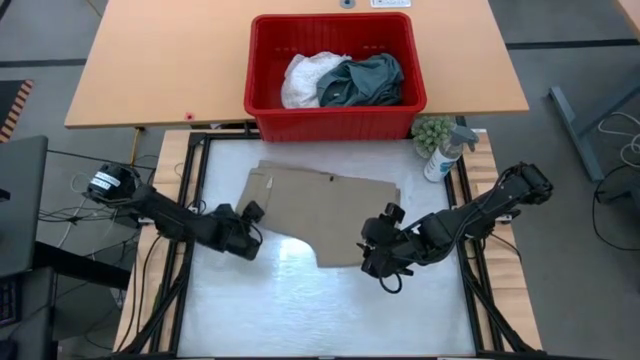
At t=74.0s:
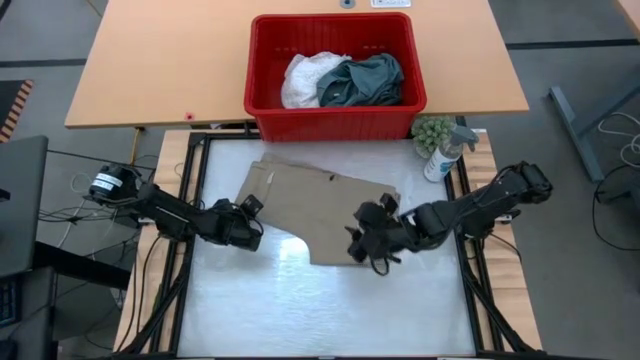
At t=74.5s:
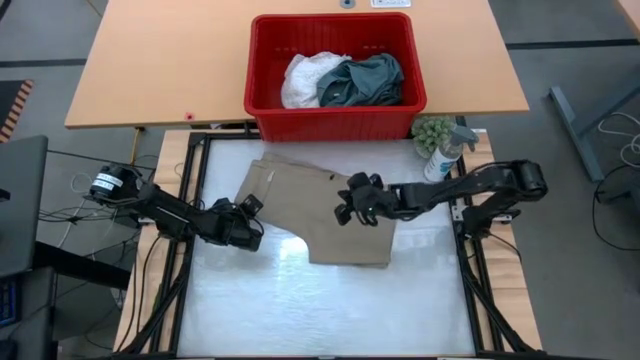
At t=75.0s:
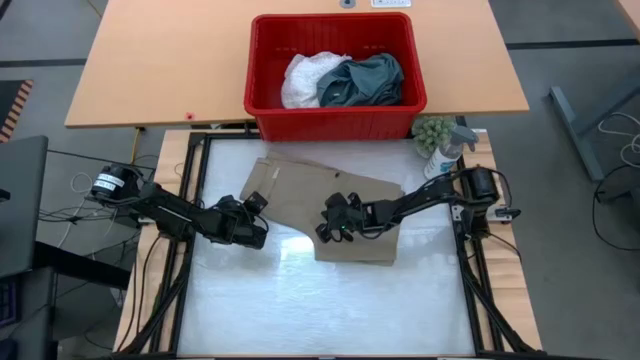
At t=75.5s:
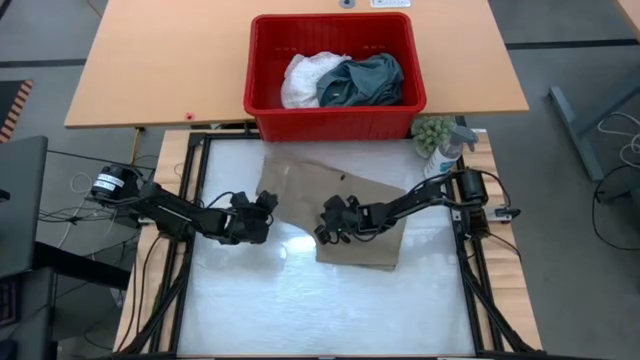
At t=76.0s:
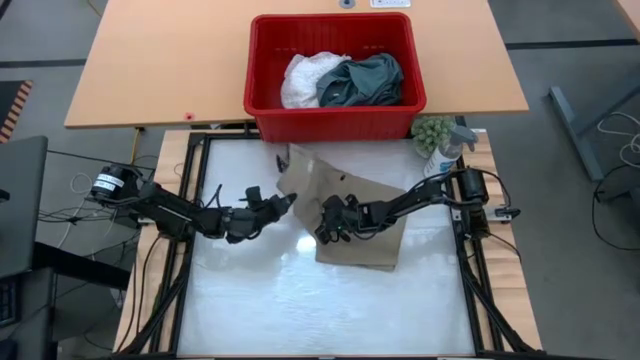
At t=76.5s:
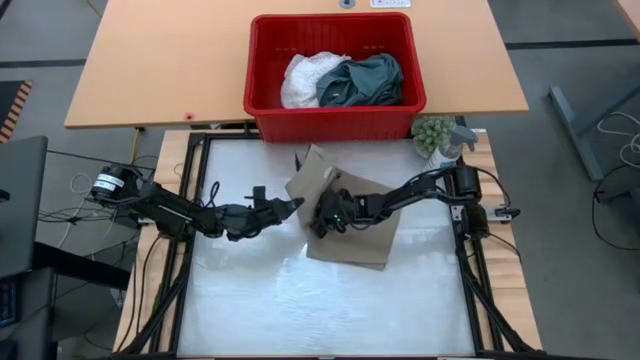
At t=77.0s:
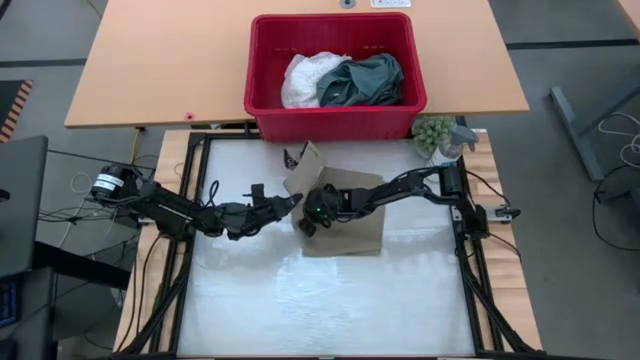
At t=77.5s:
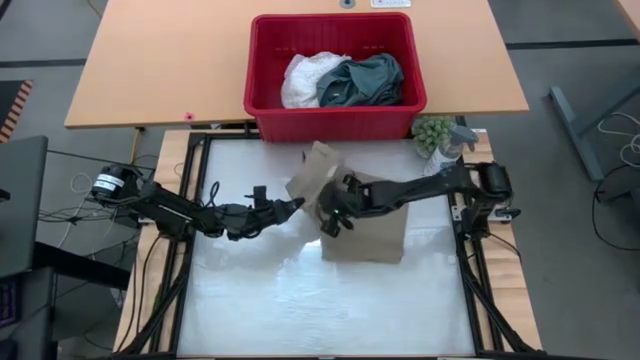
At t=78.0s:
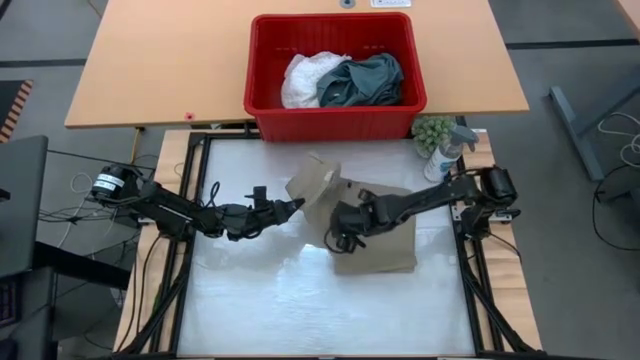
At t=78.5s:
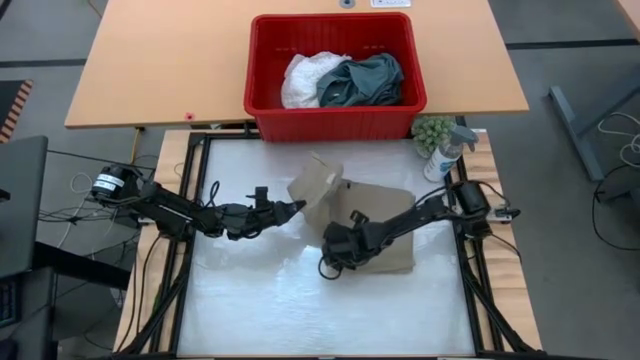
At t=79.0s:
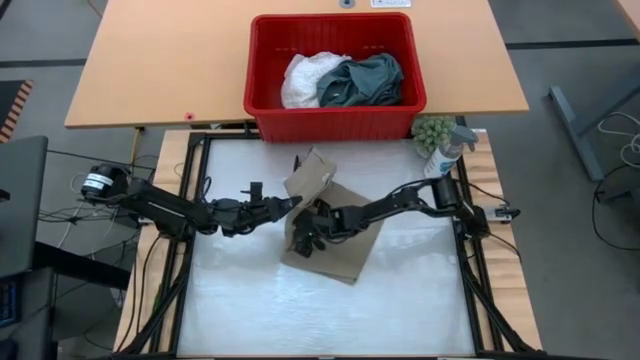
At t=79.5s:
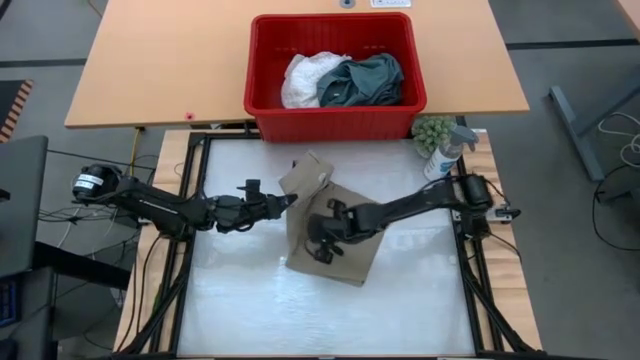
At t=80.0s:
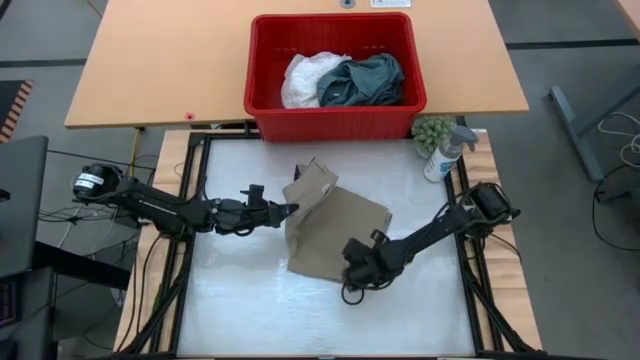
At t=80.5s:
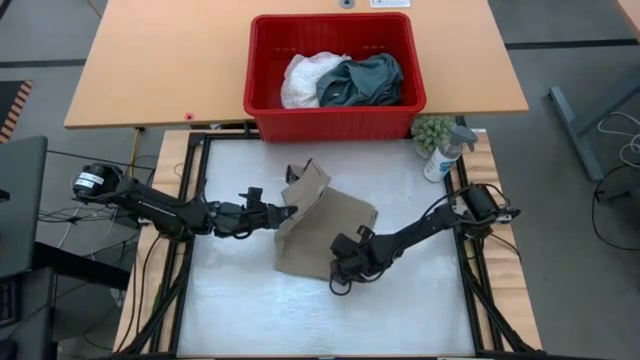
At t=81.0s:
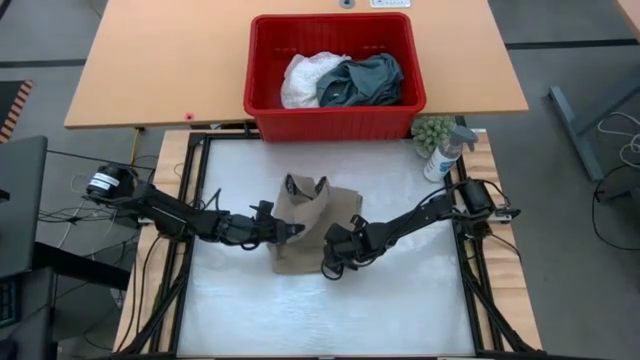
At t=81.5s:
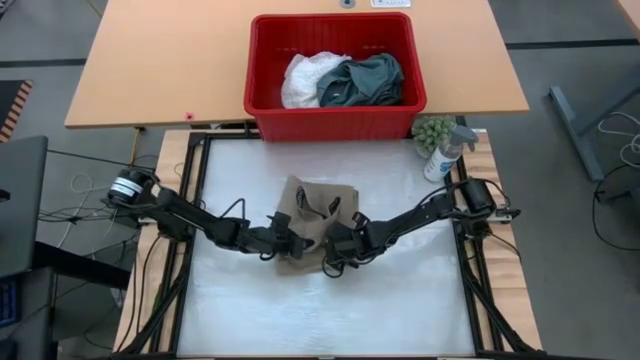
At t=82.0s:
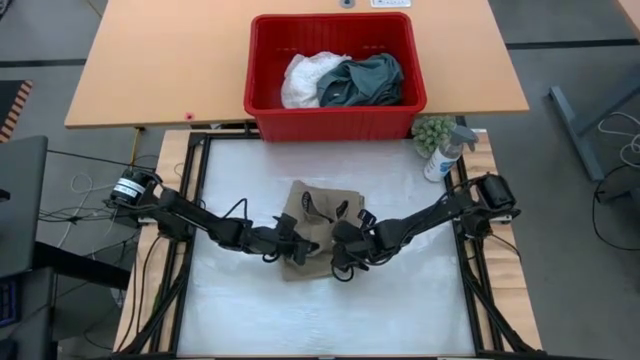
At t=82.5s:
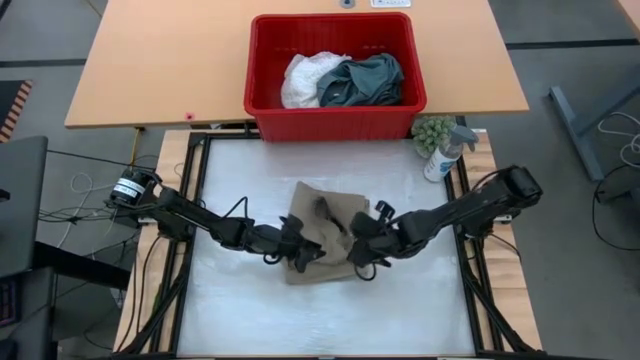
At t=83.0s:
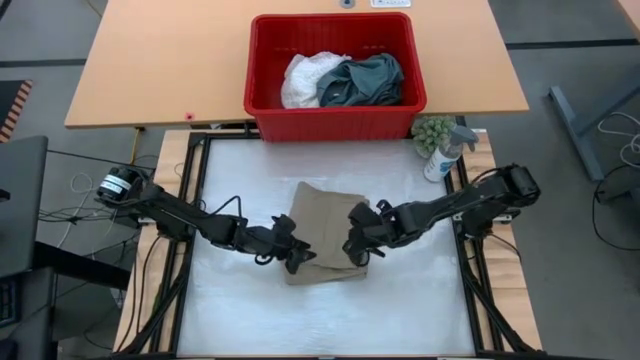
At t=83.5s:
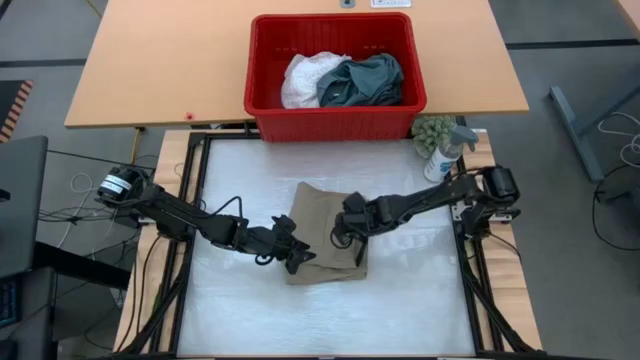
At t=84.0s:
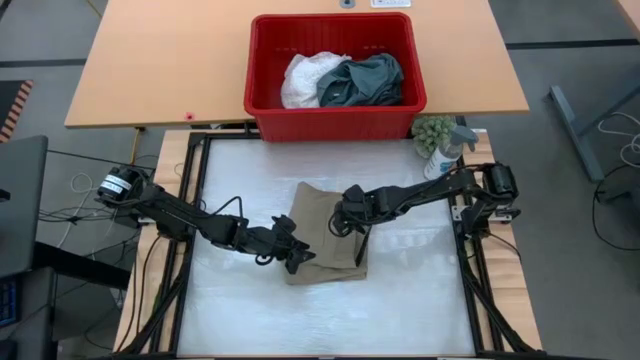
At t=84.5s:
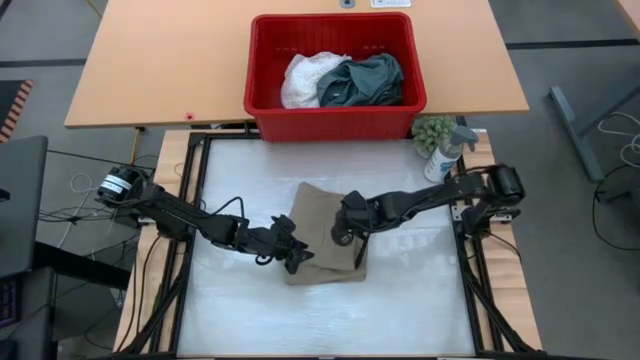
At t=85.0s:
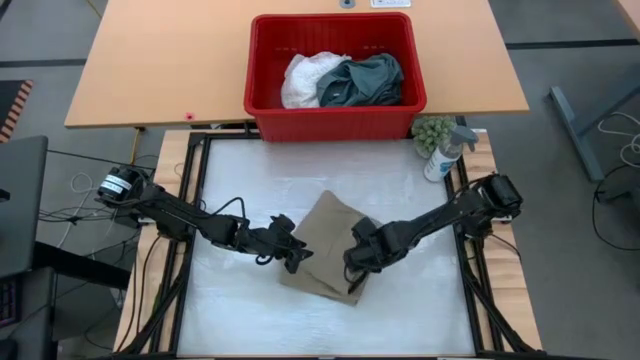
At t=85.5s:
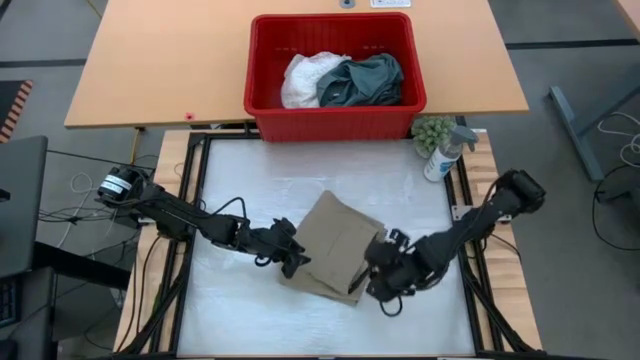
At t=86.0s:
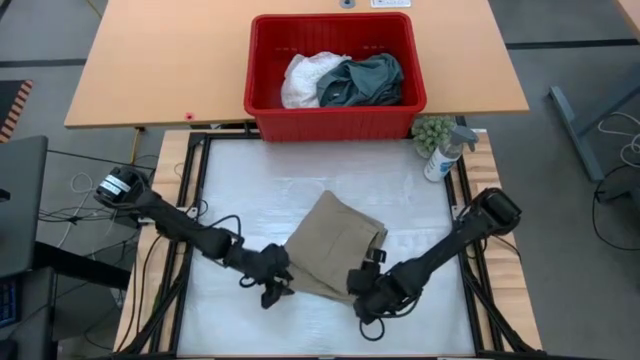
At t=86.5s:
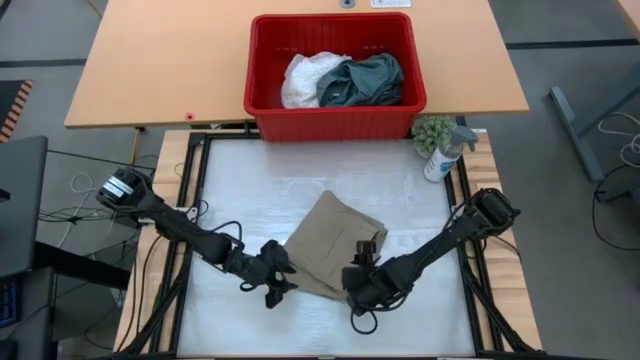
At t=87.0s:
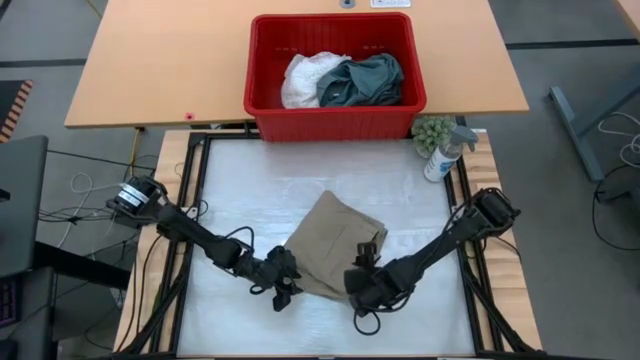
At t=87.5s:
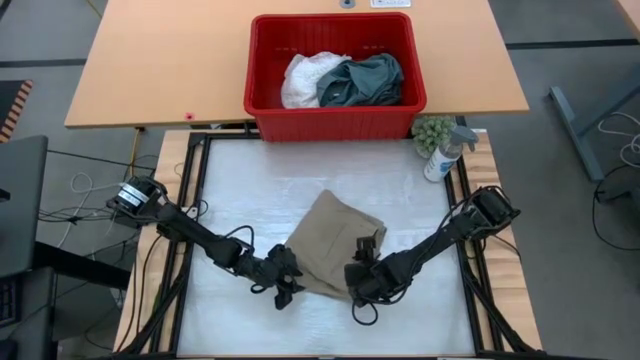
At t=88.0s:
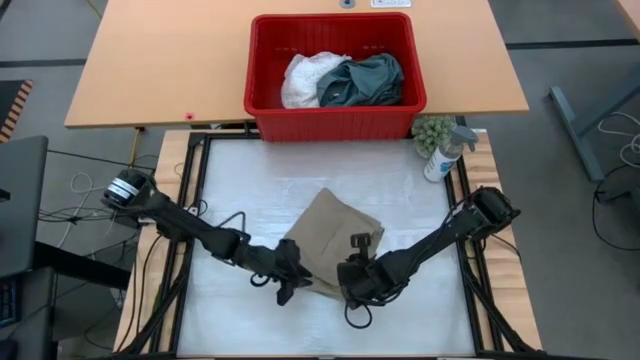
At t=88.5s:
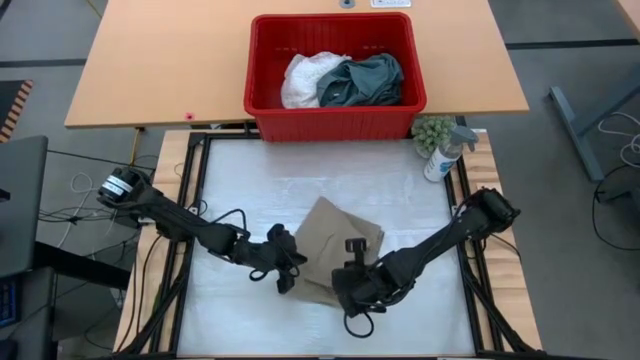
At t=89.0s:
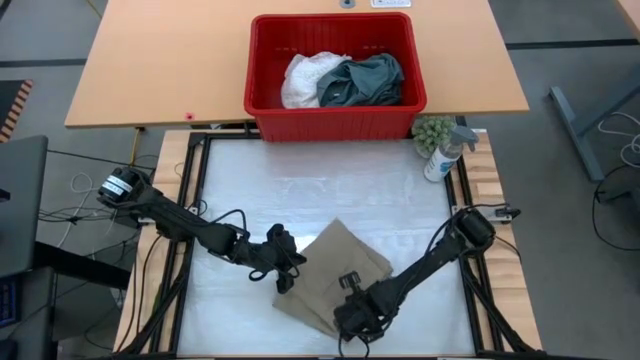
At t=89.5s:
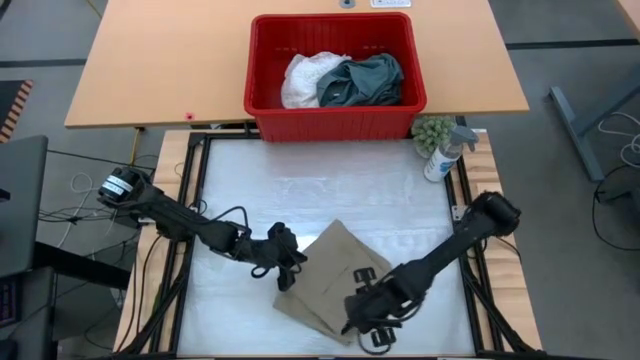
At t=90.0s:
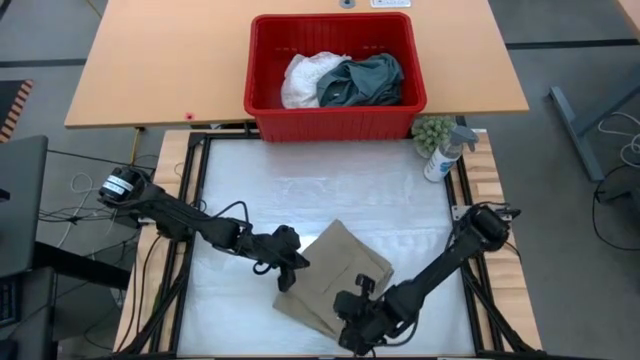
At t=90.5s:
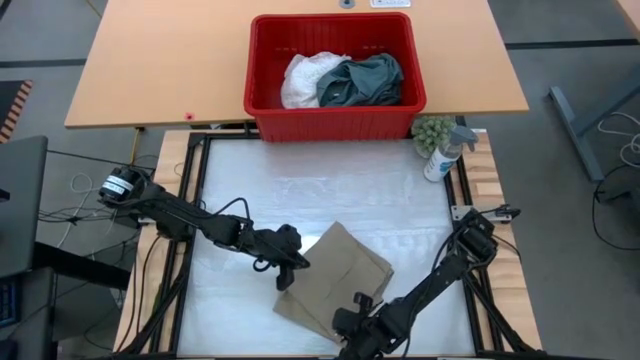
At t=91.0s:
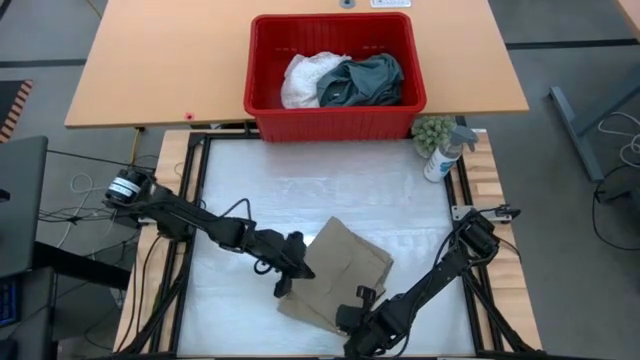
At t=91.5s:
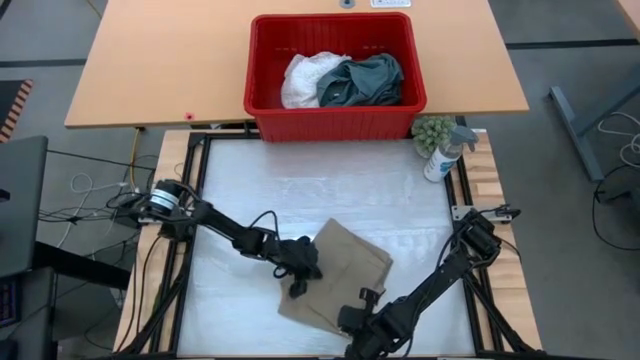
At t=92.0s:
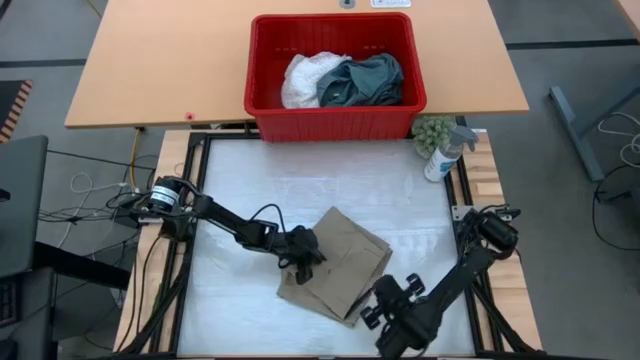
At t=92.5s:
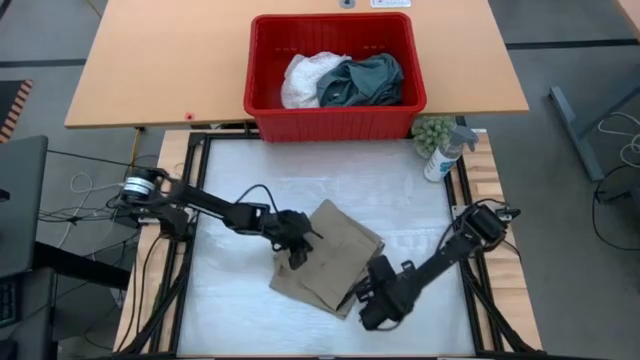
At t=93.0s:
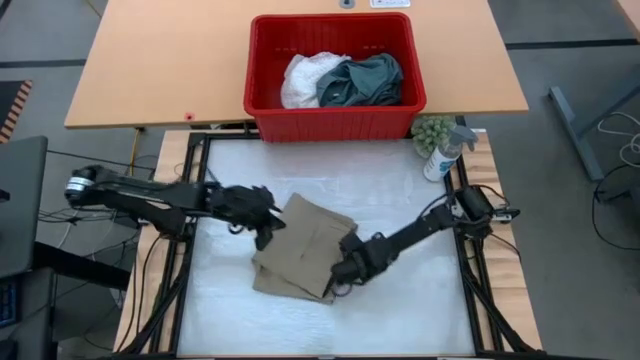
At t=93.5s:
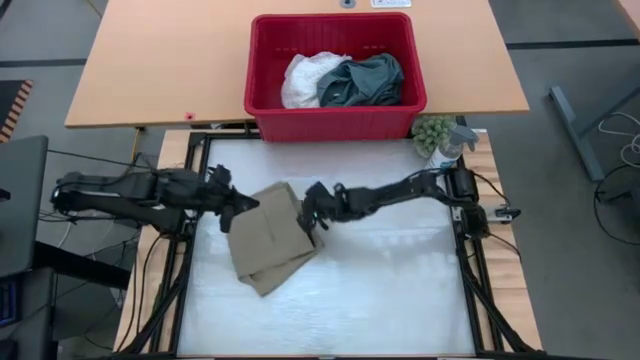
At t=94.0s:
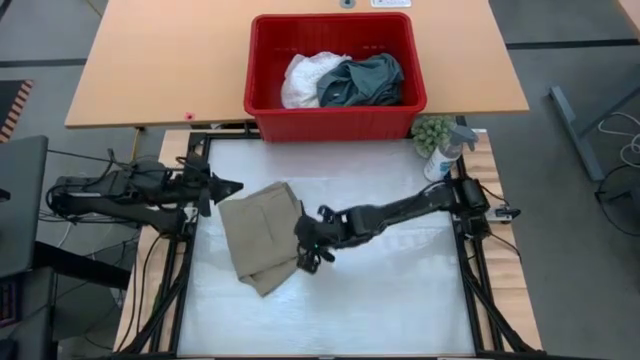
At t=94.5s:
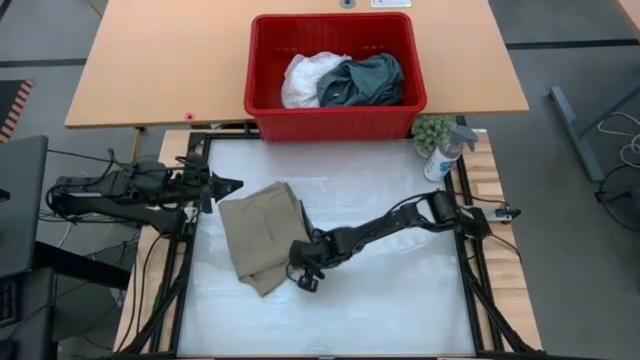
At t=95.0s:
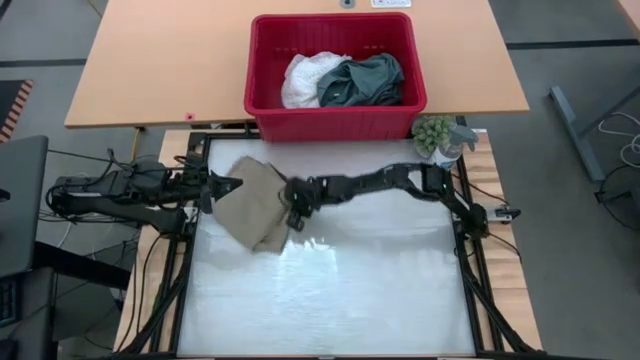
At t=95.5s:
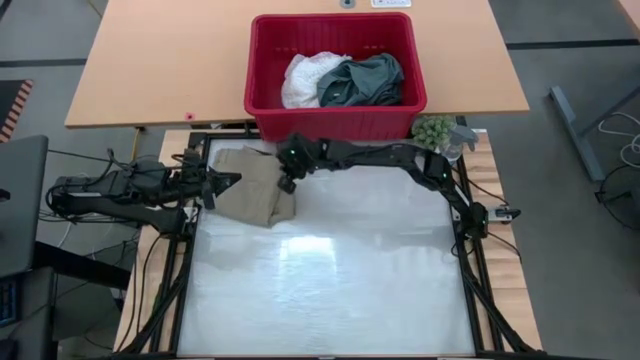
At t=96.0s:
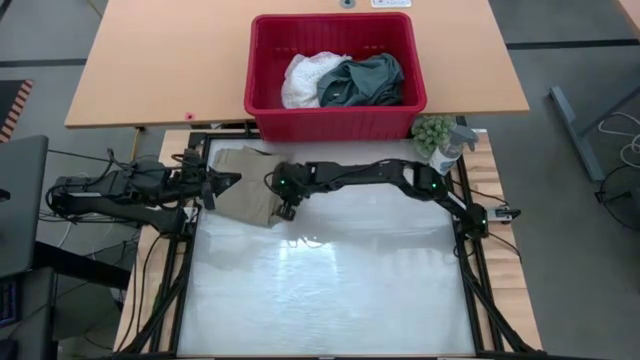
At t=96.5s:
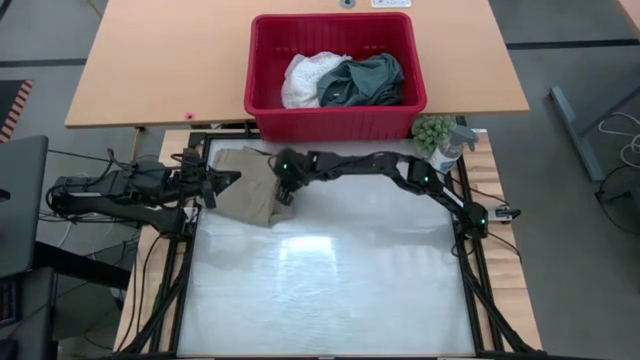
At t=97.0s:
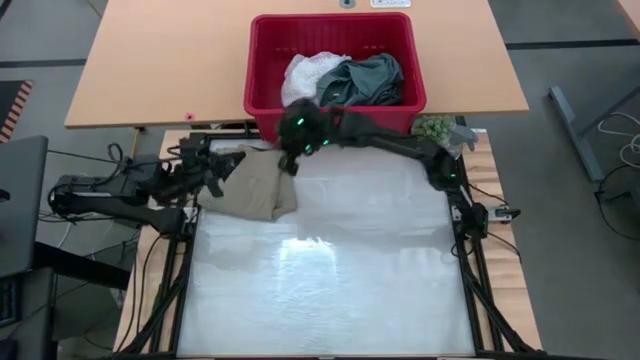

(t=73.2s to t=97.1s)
Task: Fold Laundry from Bin
Fold the brown short pants in the red bin
